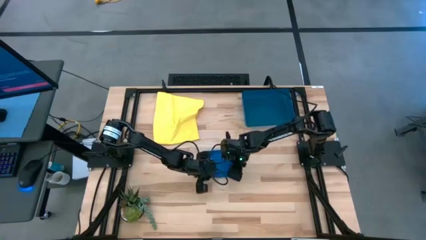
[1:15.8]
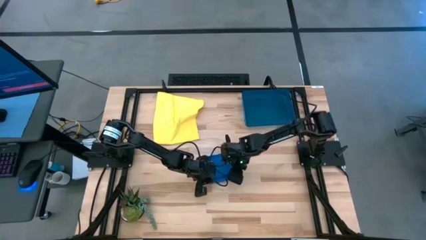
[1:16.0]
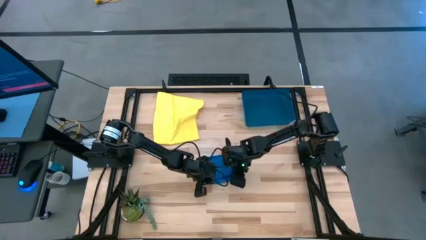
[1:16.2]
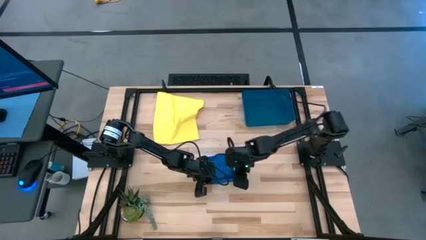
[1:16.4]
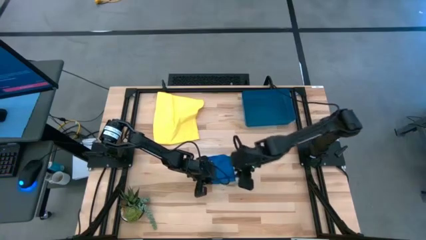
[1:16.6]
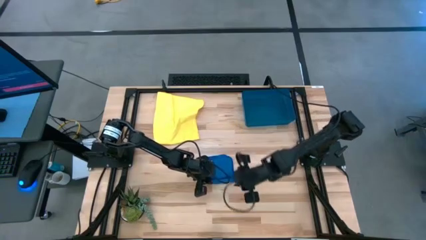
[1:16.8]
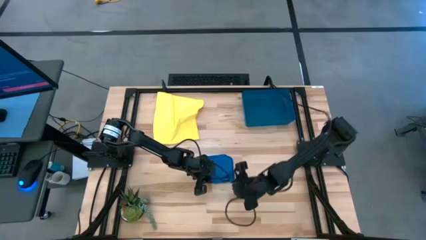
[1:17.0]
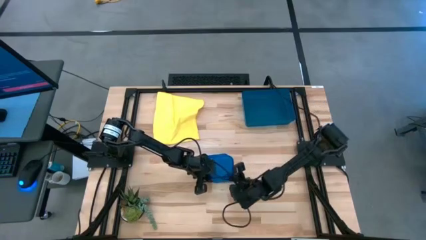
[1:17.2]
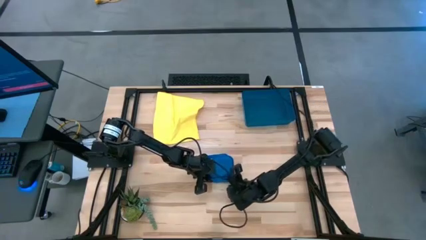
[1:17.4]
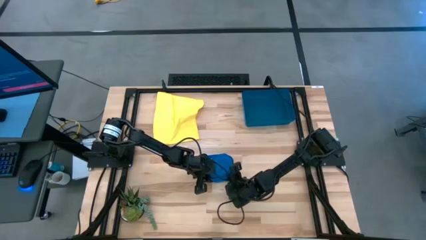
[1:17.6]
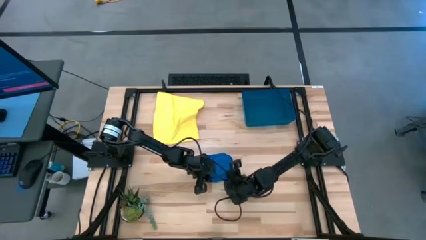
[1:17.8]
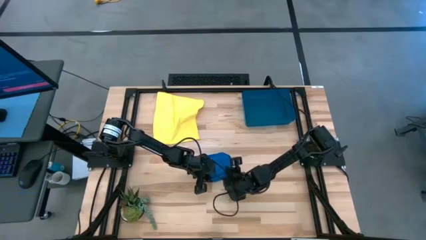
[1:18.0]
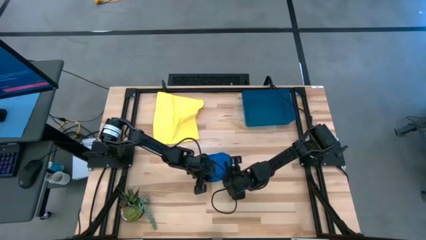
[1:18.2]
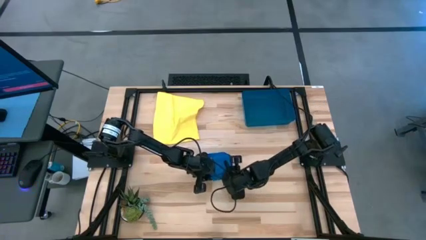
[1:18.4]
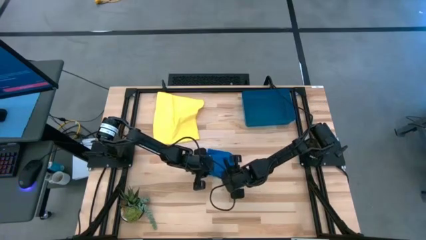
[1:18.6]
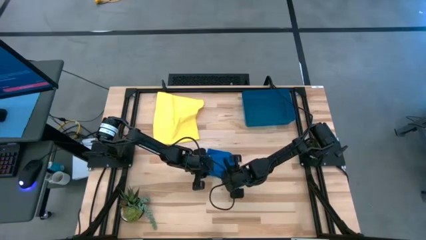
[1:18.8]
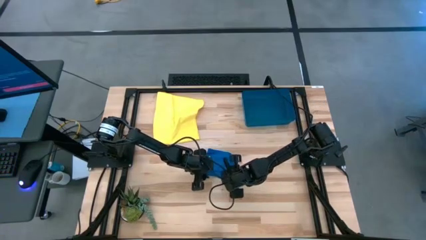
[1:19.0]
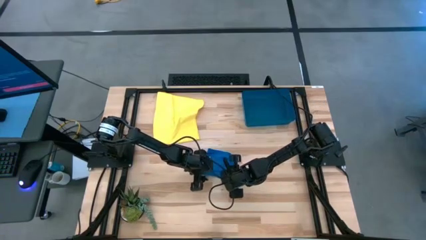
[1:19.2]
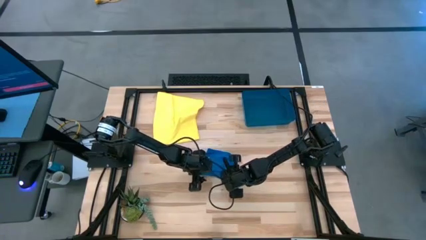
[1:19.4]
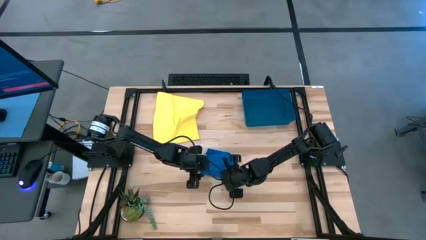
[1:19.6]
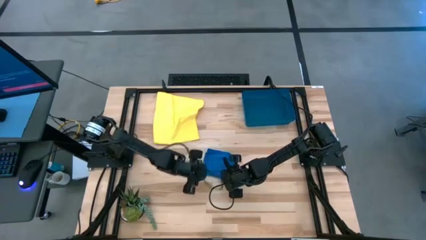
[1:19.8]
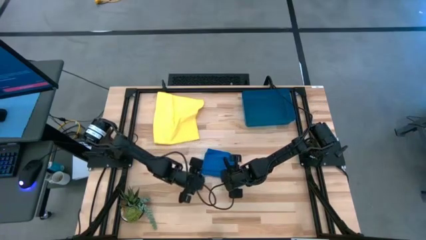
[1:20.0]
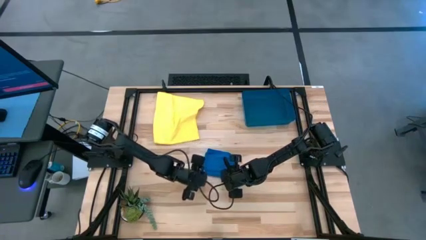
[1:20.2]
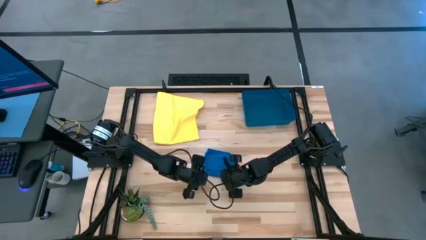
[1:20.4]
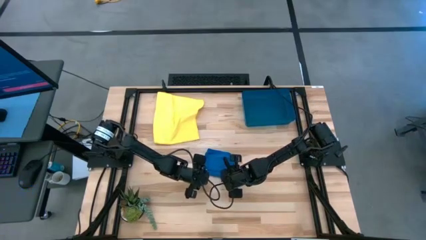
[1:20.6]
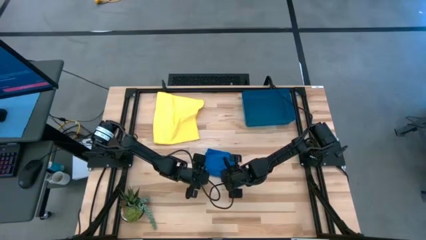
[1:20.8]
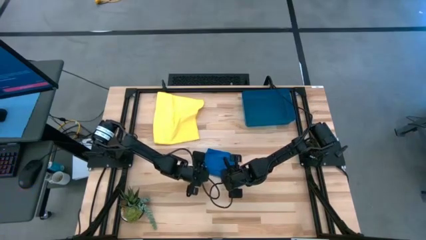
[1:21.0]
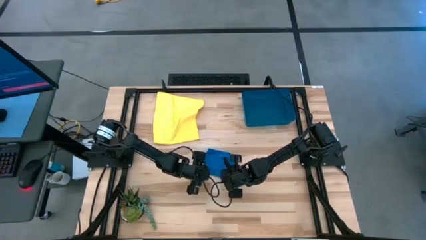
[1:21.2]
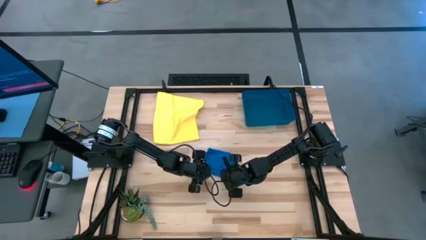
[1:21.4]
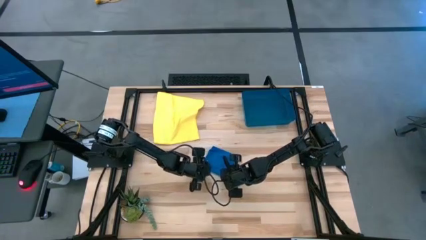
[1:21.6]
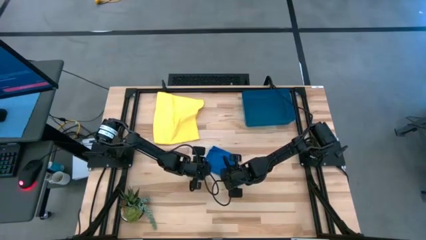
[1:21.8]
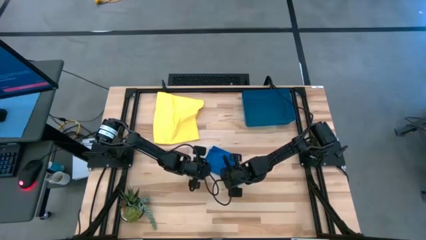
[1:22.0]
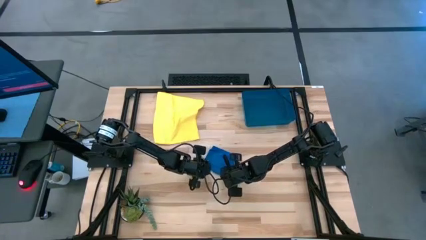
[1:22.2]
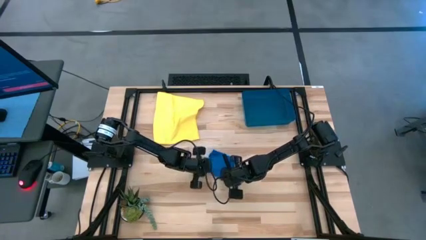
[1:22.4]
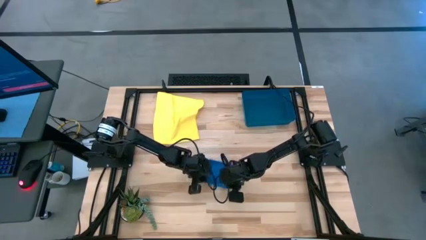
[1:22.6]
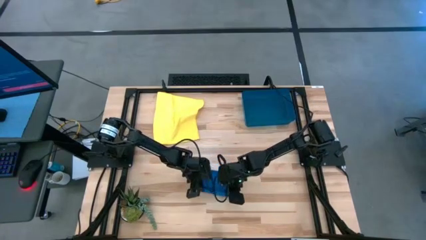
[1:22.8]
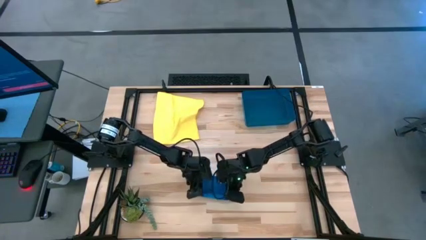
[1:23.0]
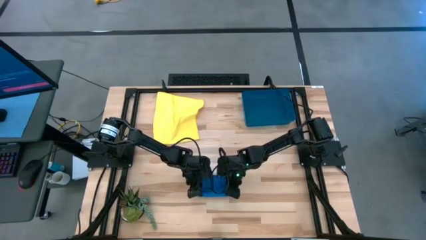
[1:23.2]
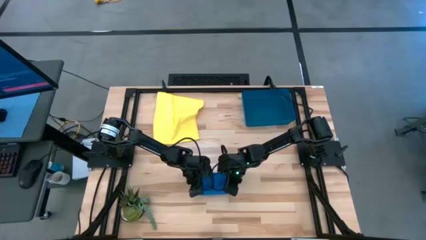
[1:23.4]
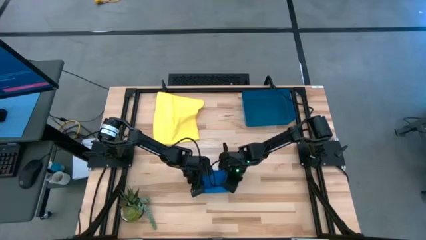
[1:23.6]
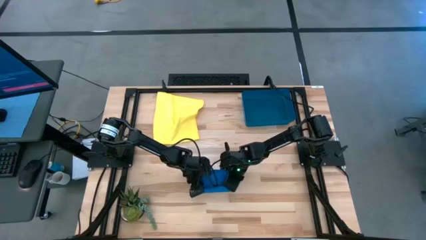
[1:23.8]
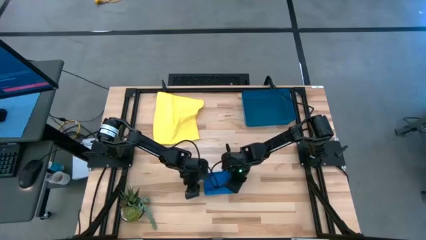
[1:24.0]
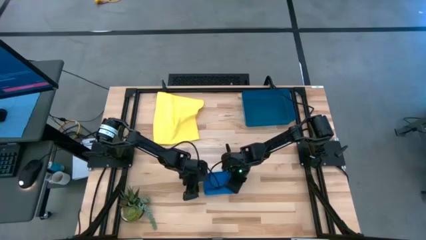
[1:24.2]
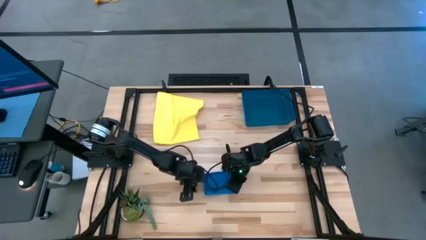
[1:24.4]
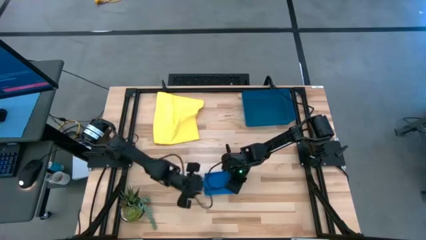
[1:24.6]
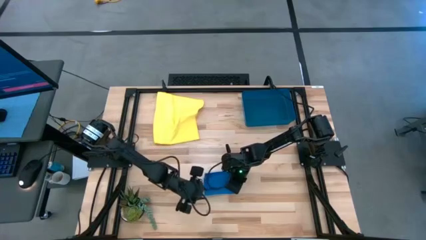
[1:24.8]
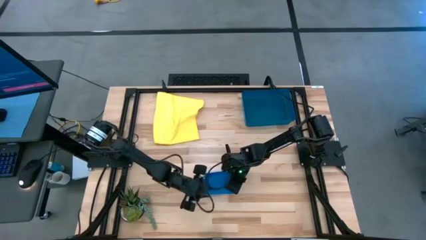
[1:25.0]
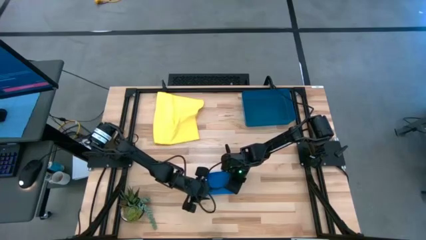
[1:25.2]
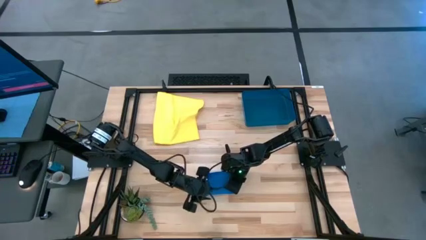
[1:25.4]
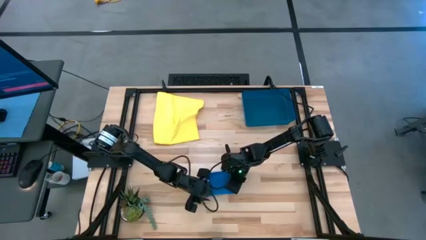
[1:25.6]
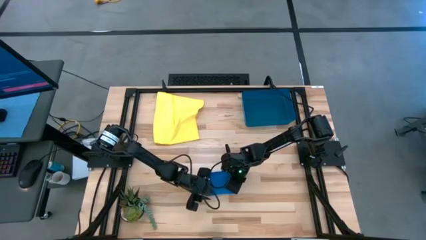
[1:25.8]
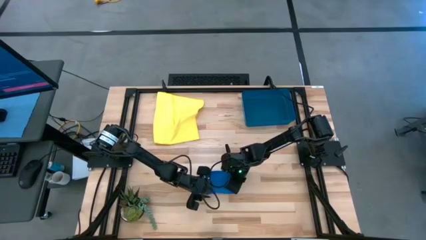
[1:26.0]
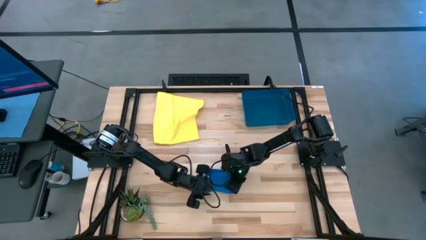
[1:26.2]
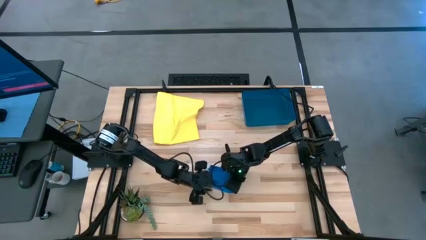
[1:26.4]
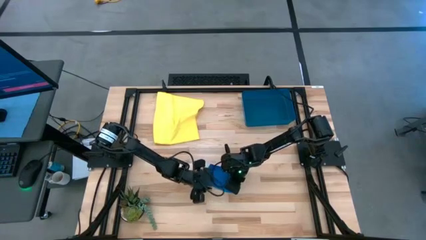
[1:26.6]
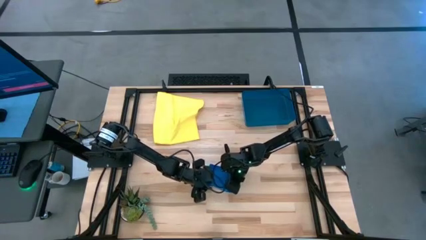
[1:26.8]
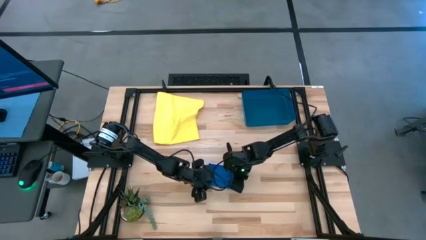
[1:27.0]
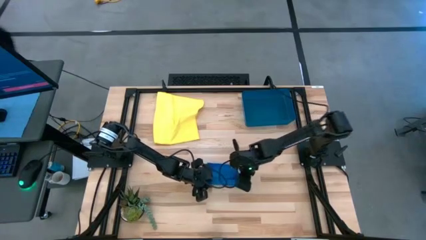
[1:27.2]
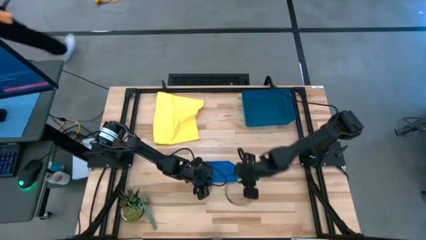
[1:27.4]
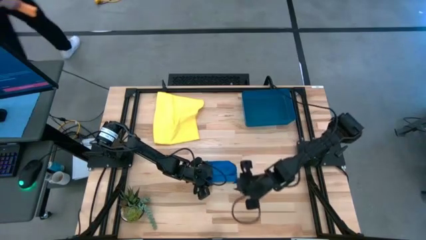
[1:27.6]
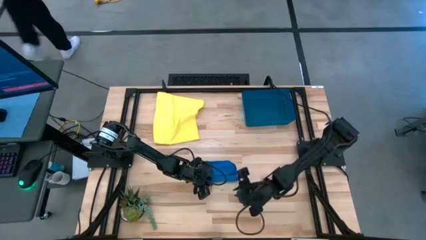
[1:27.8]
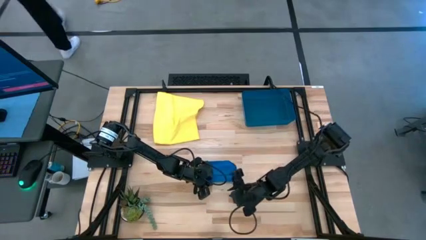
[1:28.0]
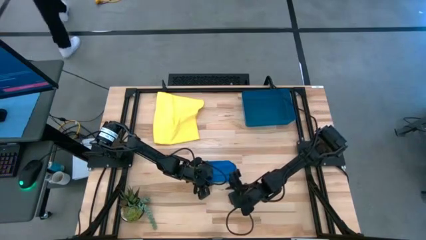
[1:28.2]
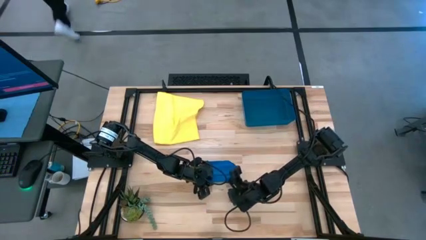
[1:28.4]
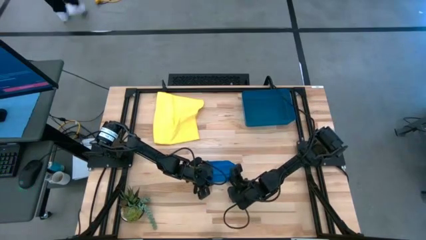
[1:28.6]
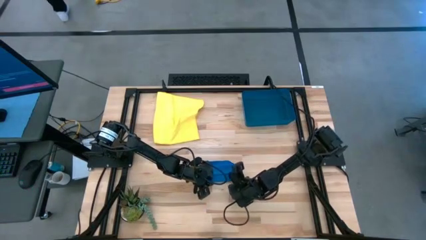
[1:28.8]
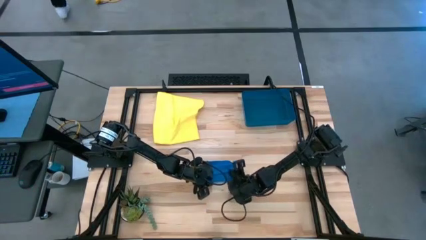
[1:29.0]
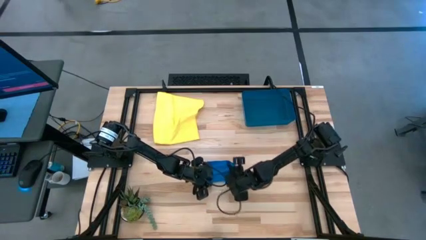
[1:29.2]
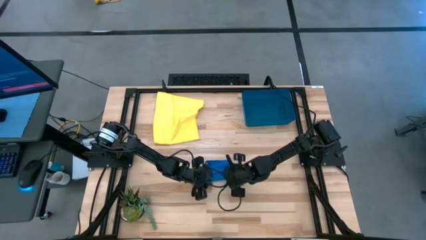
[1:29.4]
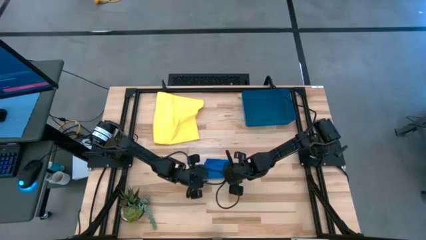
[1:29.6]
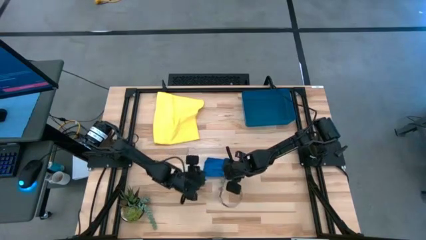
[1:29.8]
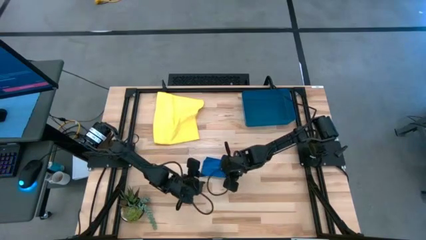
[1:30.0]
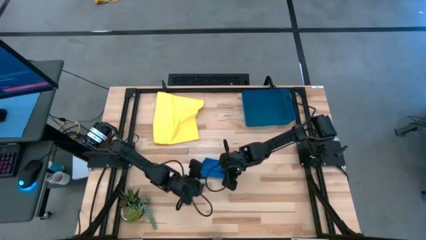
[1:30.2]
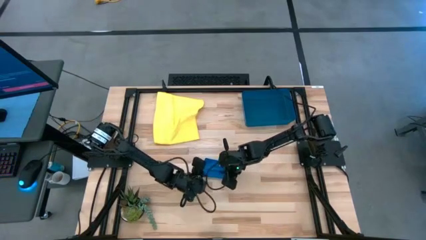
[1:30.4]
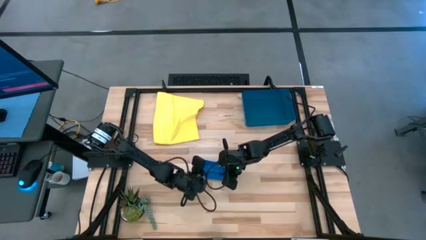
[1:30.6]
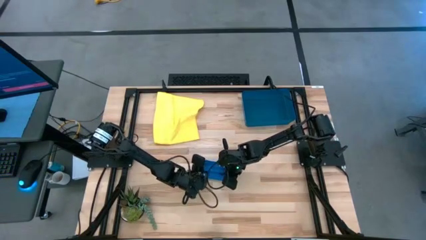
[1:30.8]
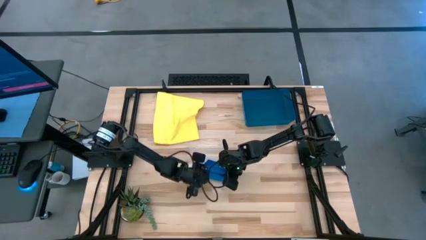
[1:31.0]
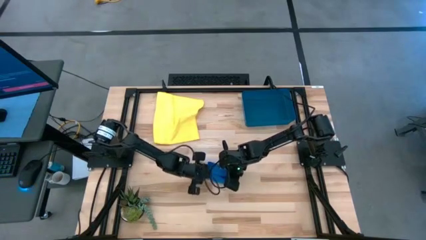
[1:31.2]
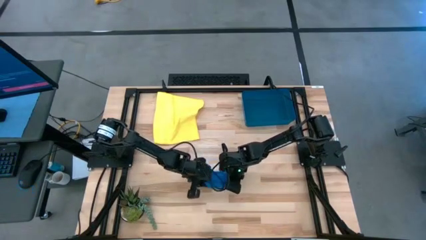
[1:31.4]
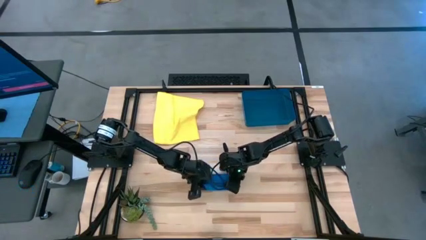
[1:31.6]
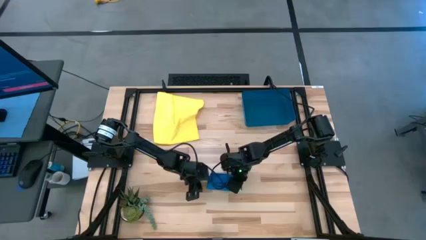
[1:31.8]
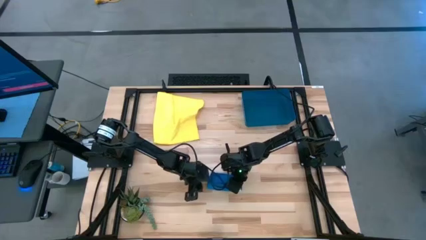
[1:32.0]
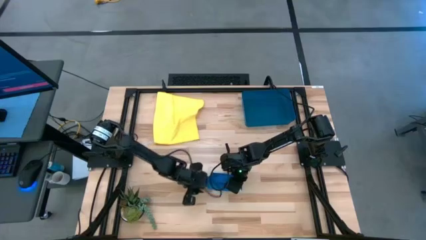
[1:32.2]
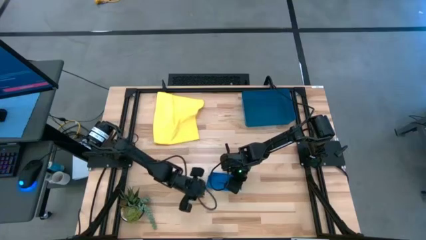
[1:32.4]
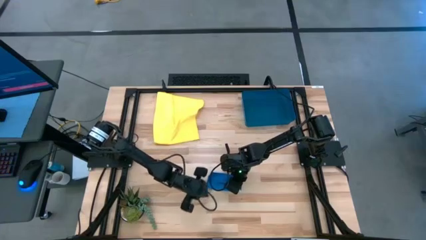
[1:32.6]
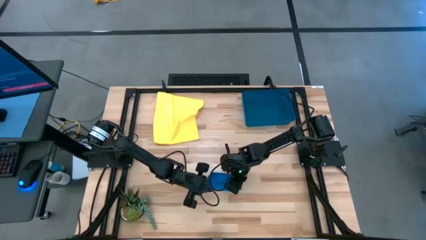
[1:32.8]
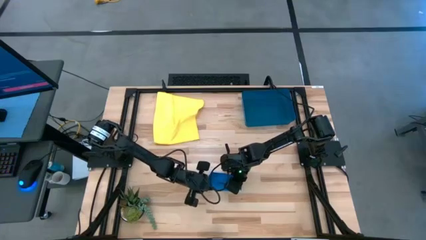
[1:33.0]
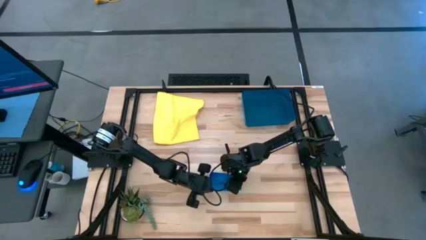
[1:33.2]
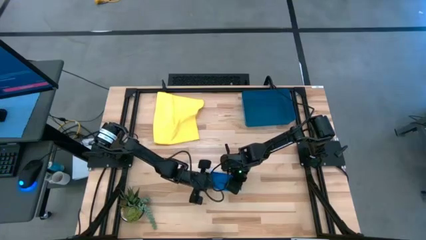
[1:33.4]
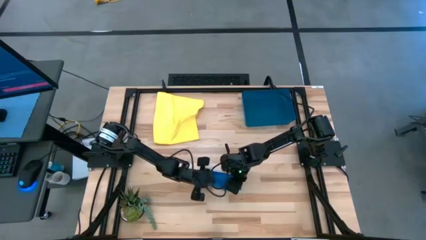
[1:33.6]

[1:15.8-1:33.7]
Task: Roll microfiber towels into tight, uniform cylinder then place into a basket
Roll the blue microfiber cloth
